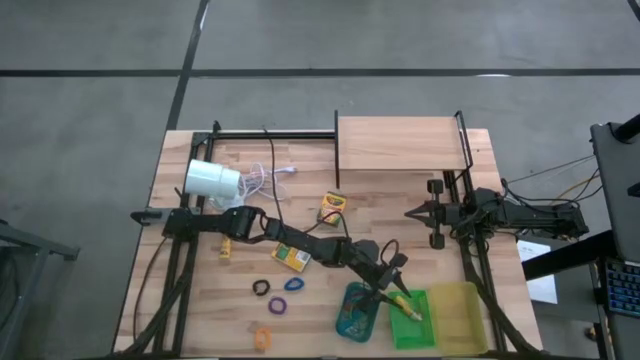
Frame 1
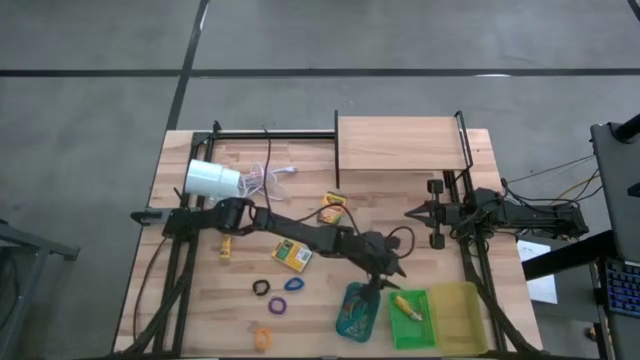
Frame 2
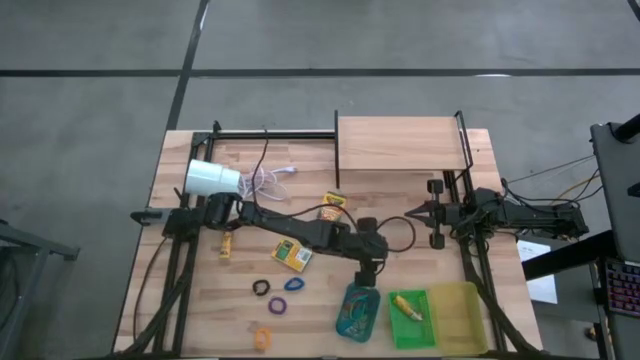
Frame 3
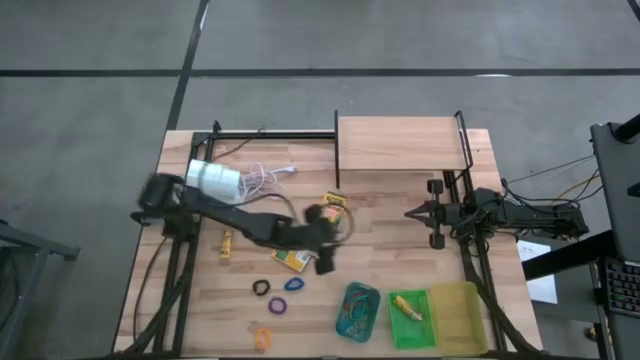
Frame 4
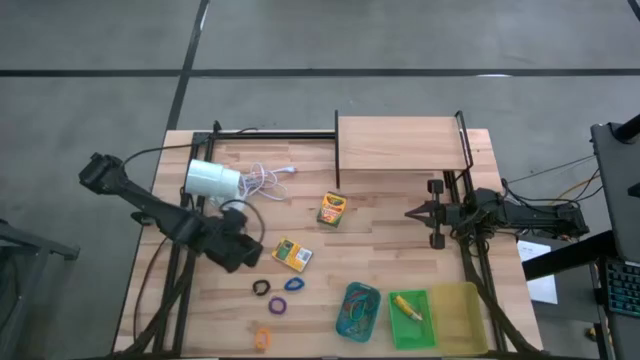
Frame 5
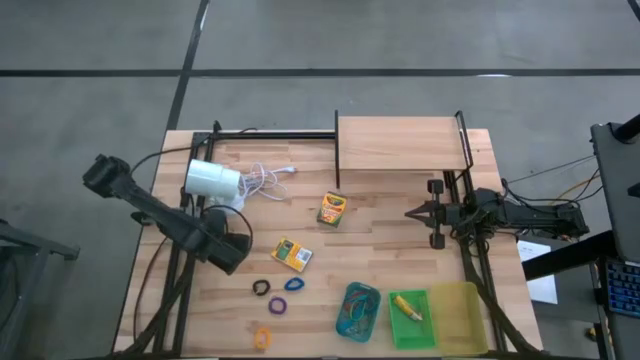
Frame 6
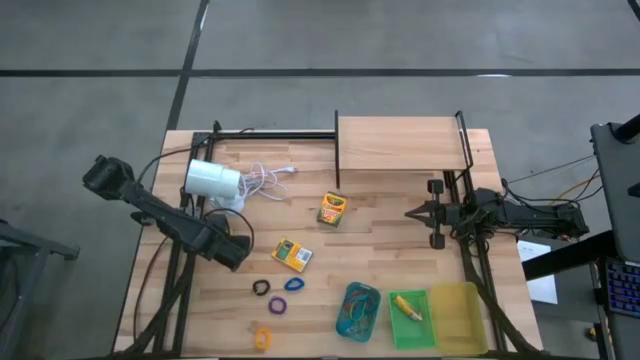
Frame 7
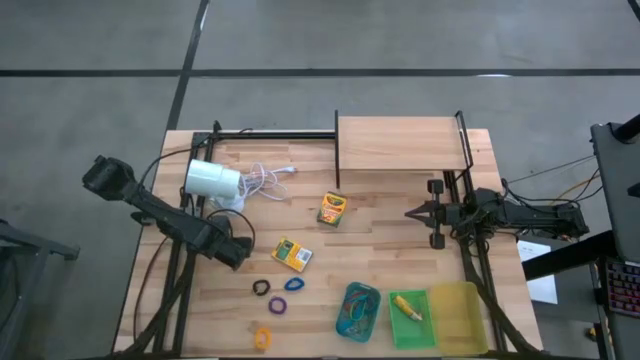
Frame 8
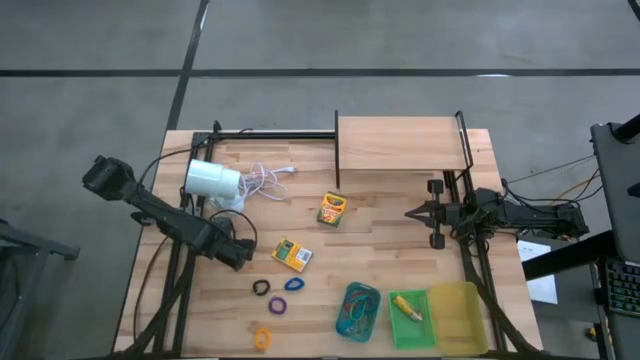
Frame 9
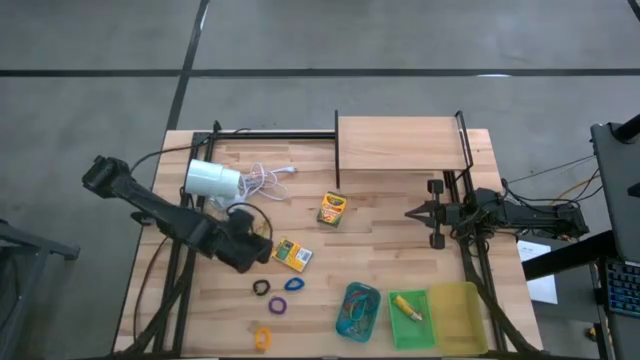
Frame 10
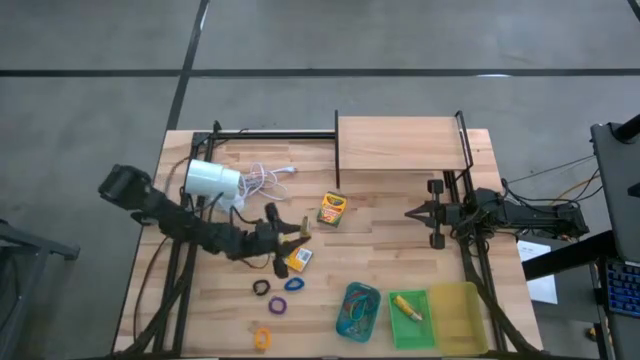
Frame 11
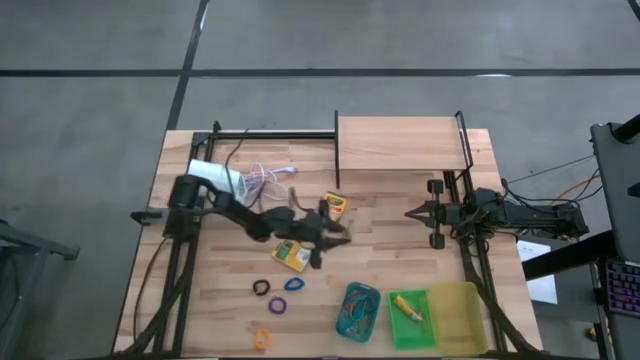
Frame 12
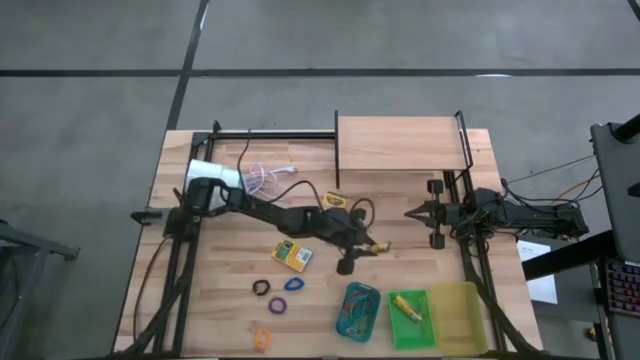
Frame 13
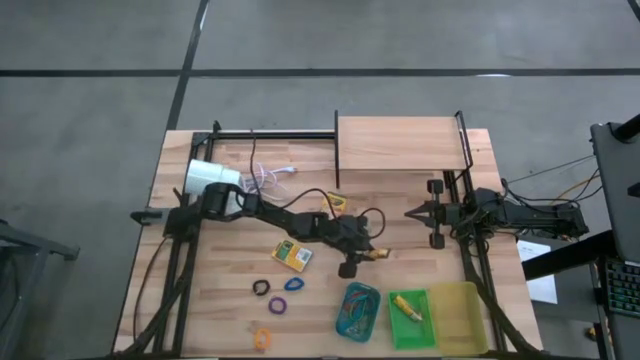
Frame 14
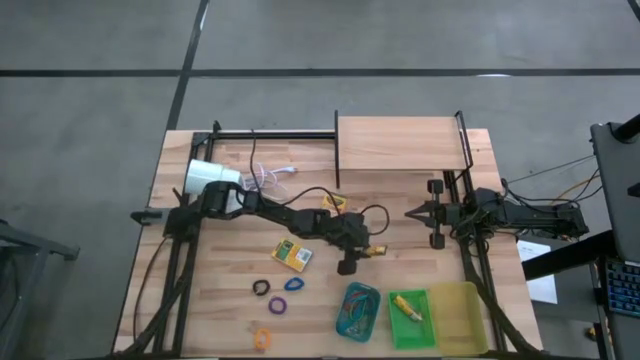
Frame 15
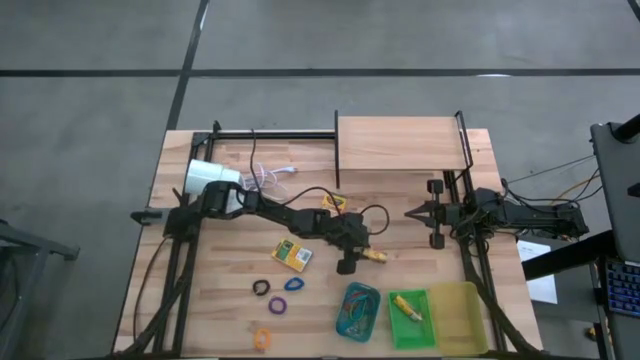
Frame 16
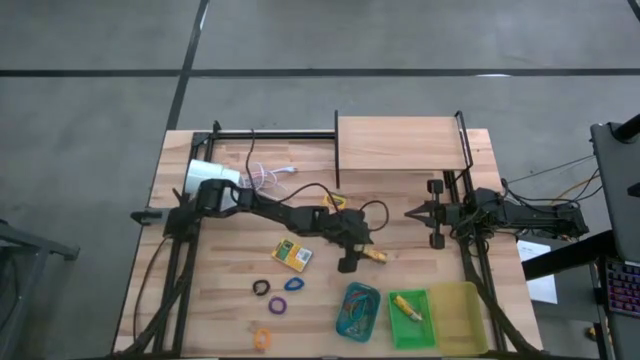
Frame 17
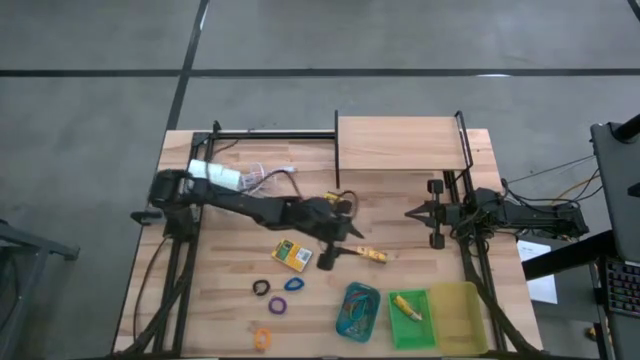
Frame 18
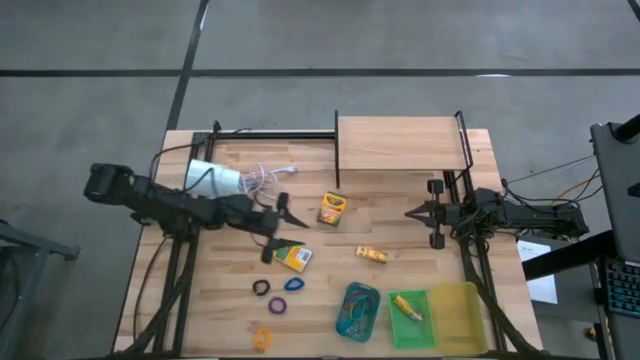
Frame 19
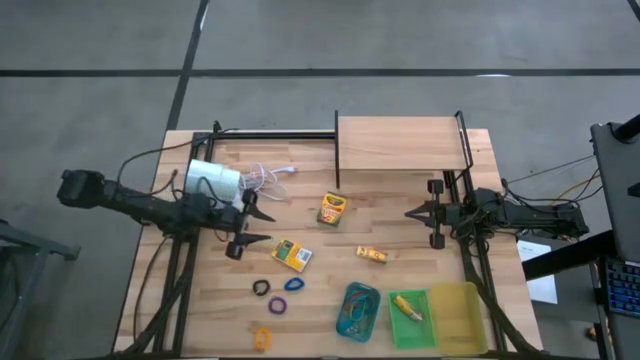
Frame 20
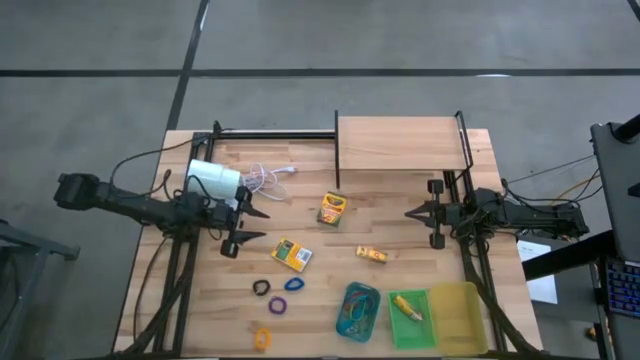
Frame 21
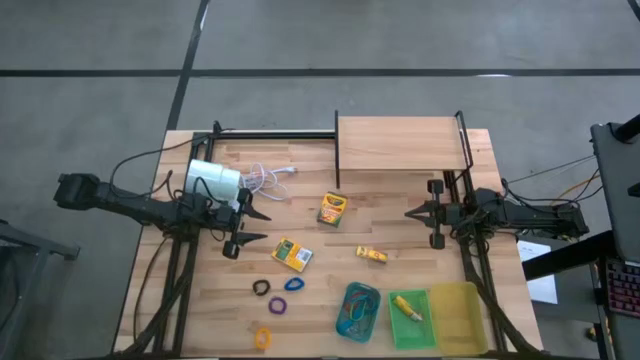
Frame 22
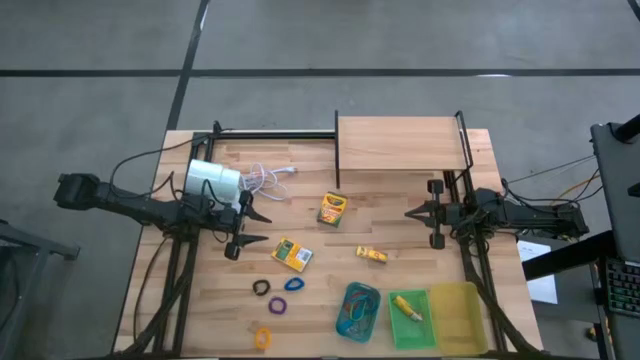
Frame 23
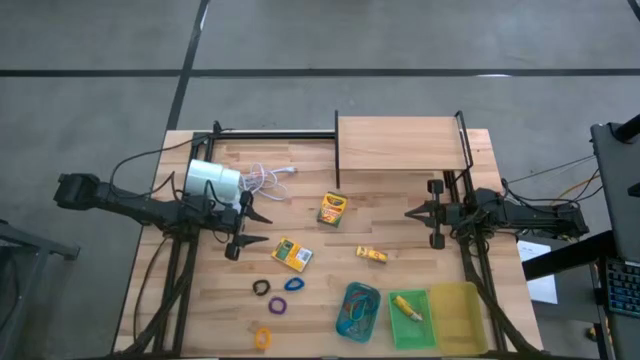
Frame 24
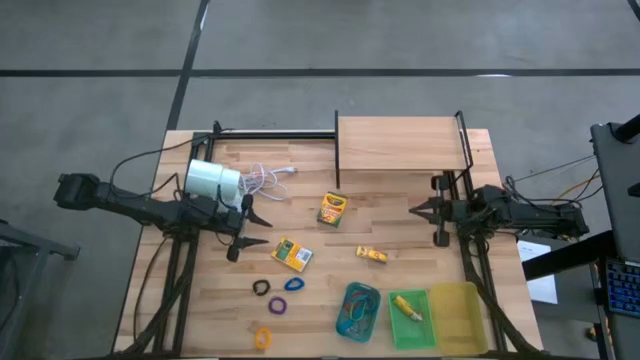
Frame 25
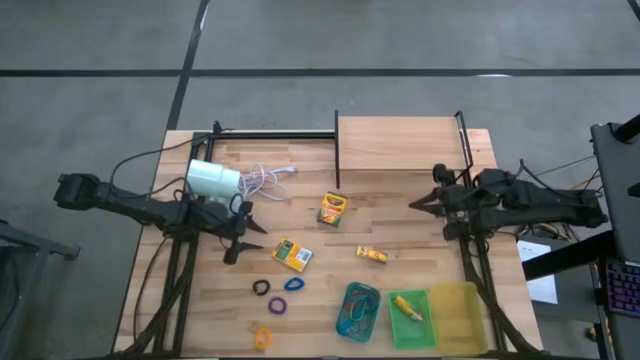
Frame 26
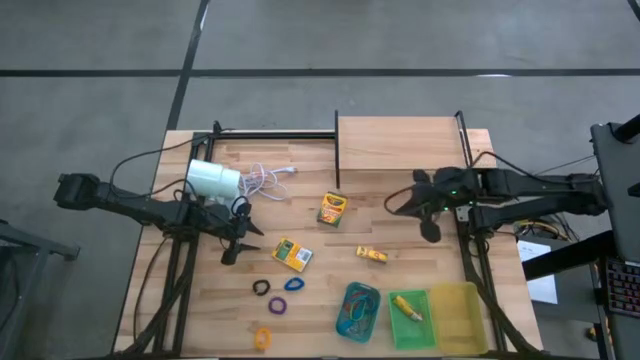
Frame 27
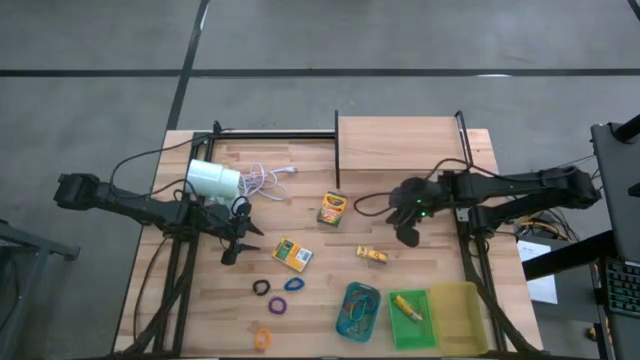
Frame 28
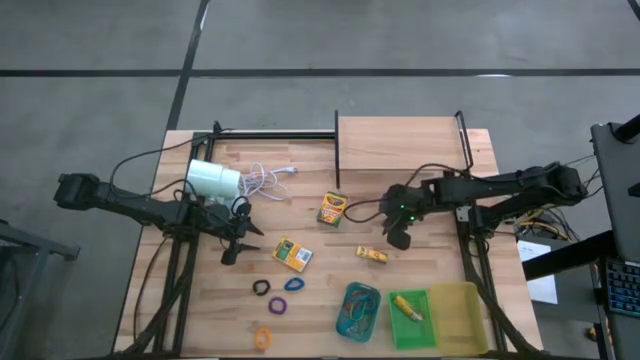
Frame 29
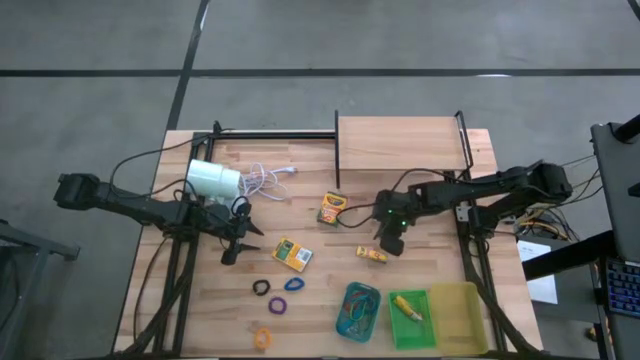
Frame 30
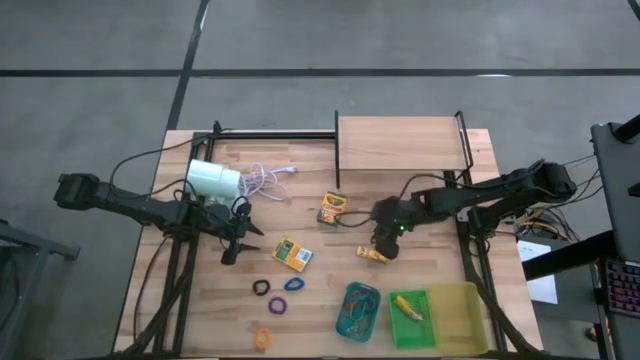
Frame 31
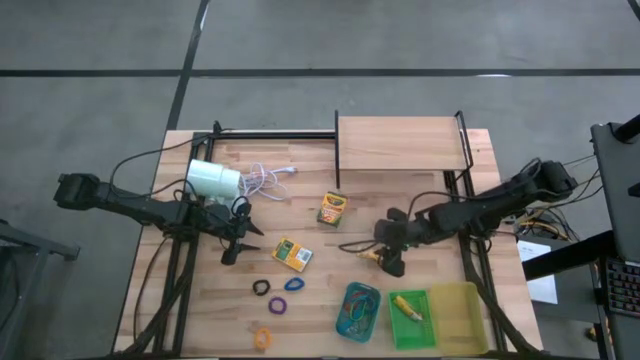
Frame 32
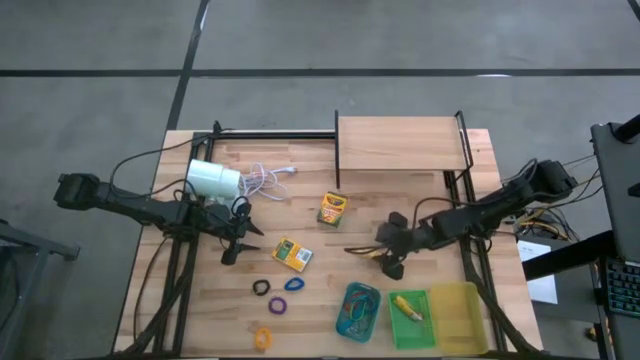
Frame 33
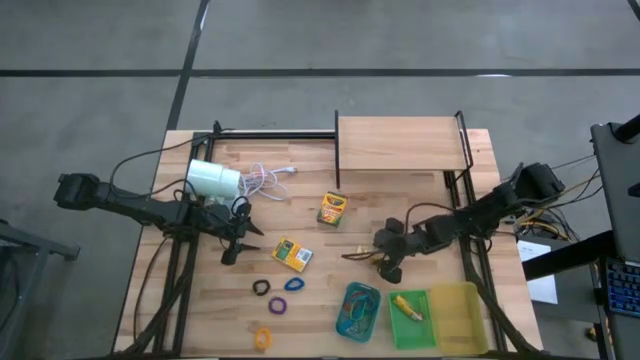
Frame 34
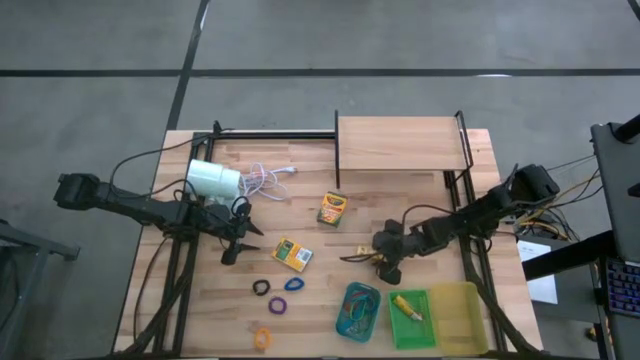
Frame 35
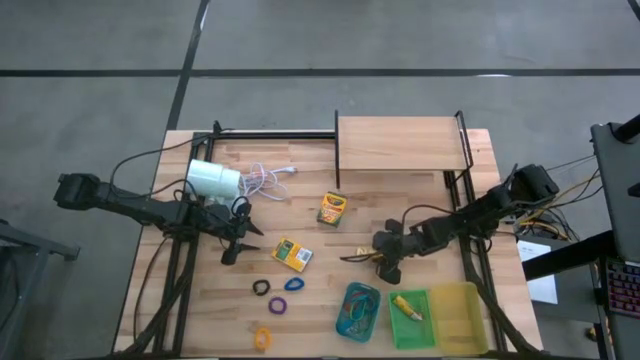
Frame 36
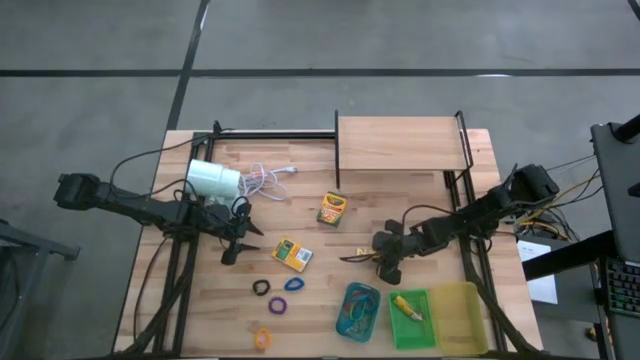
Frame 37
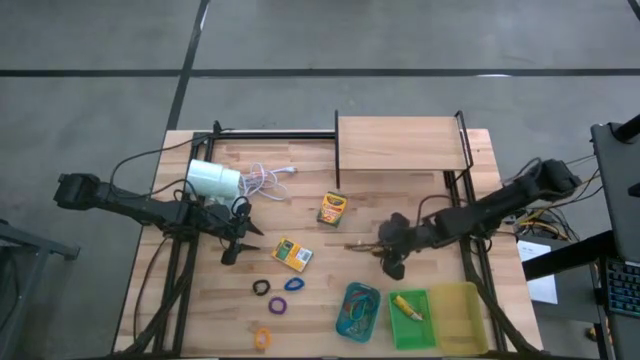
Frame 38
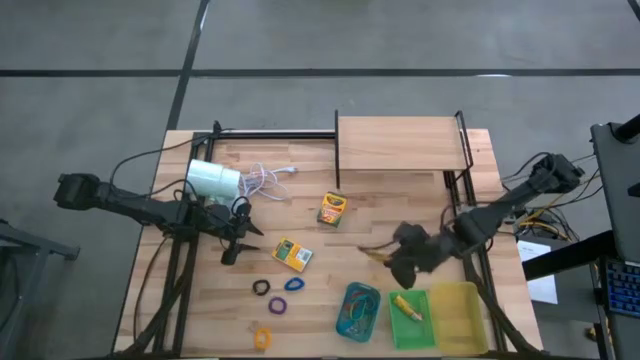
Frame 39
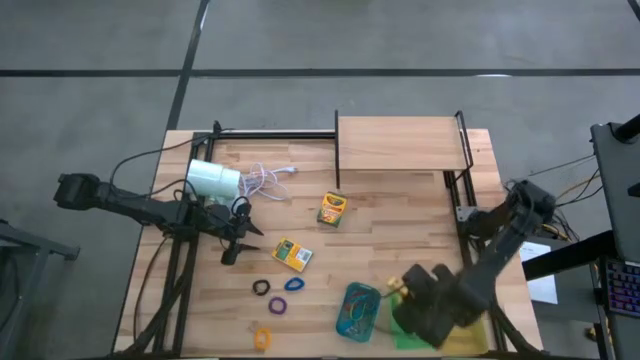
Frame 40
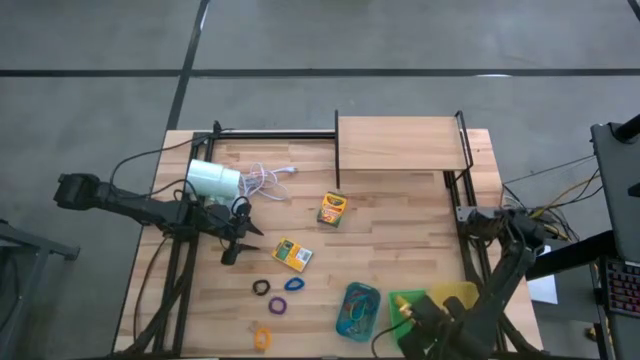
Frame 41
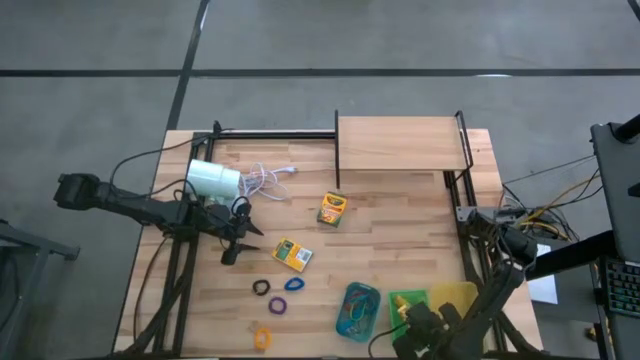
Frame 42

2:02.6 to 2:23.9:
Task: Pick & Place Office Desk Supplies
Put the crayon box into the green bin

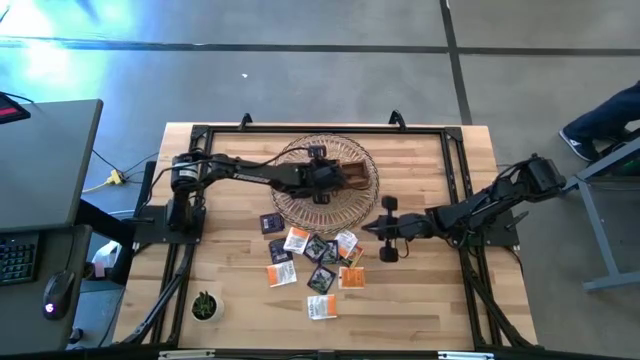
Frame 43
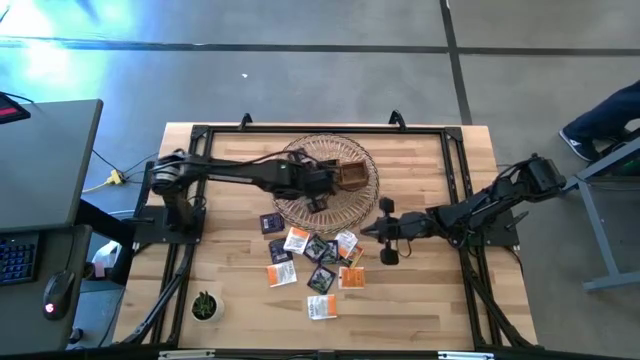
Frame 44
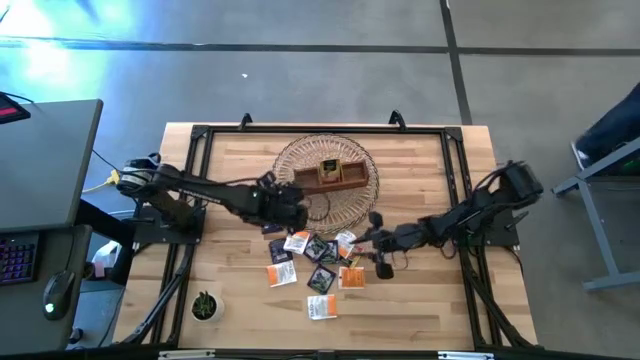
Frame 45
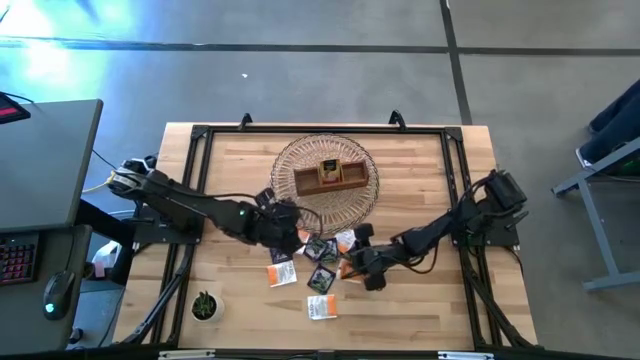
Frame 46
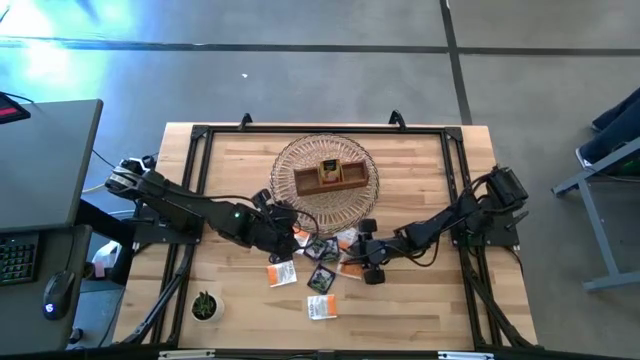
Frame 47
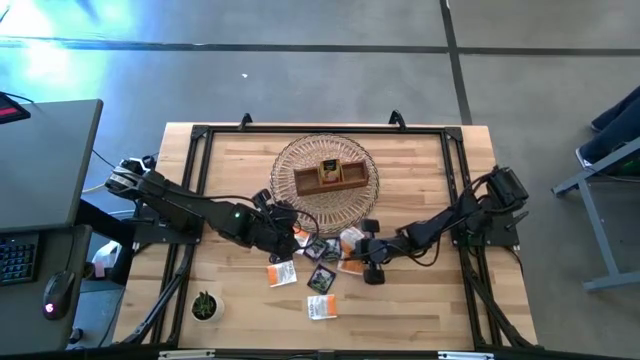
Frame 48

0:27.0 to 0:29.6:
Task: Pick & Place Tea
Put the orange tea bag into the middle section of the wooden organizer
